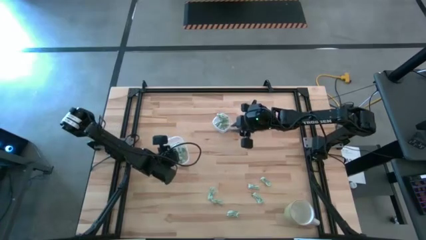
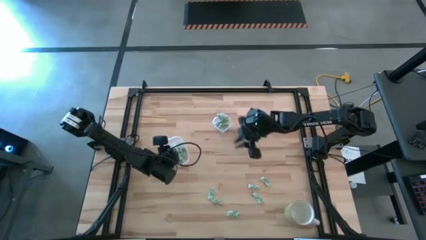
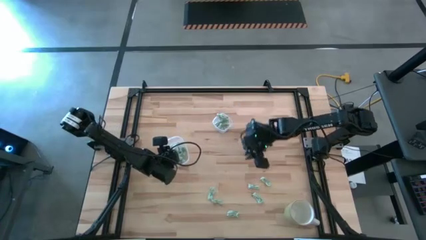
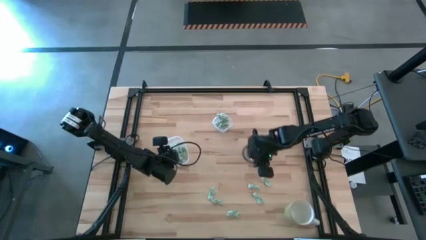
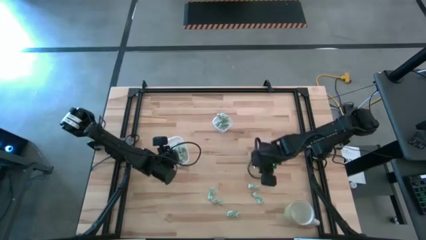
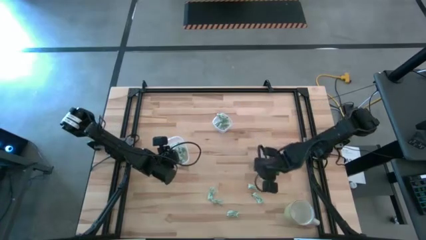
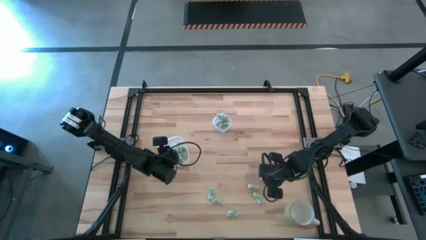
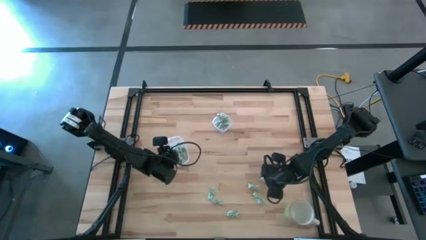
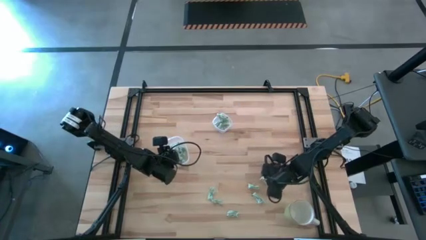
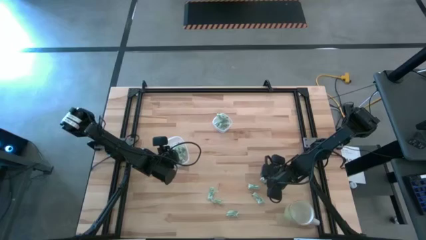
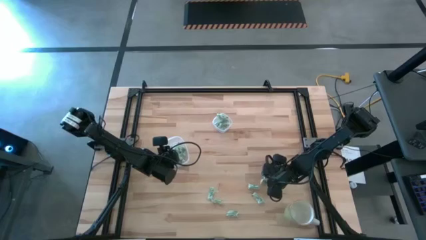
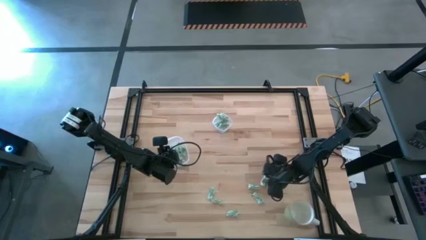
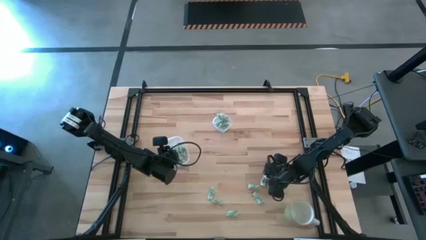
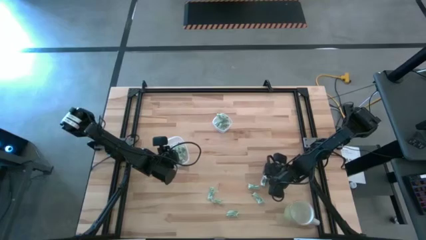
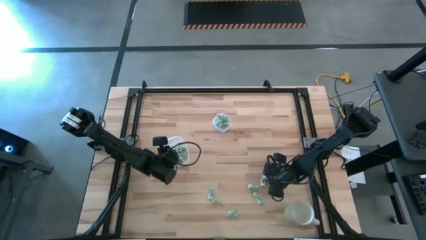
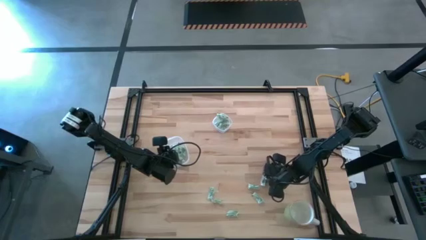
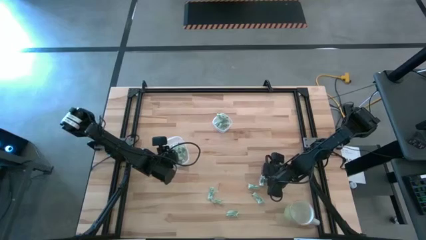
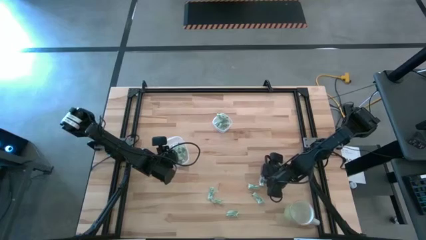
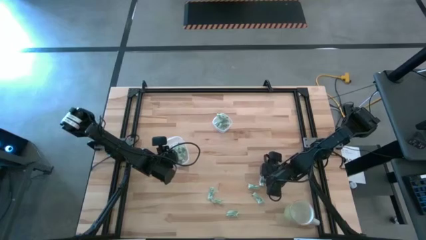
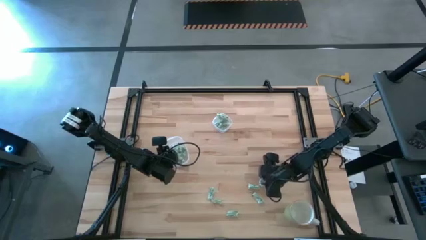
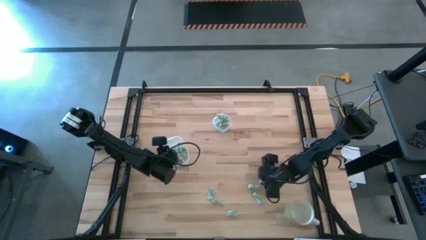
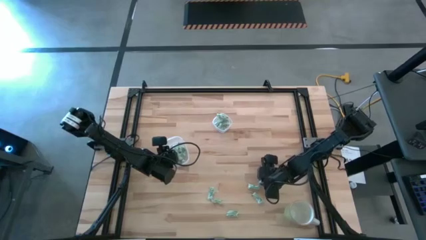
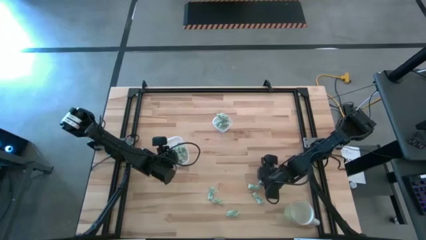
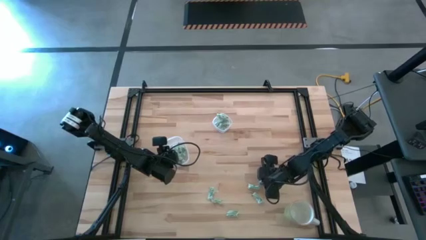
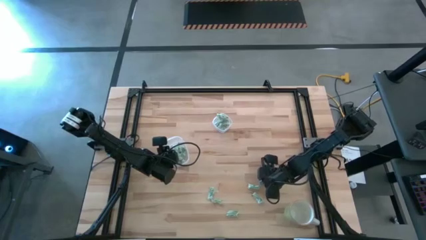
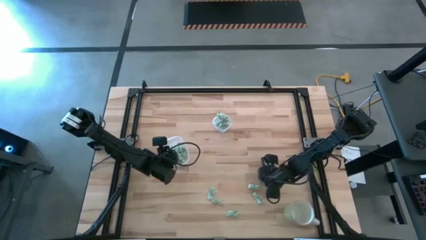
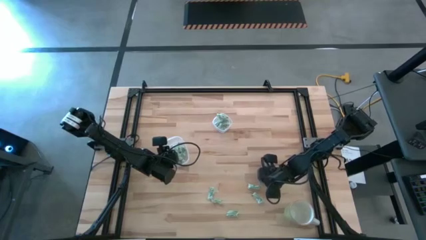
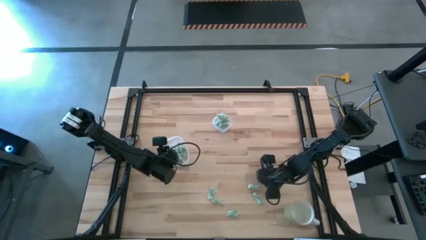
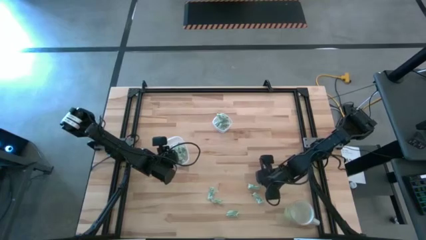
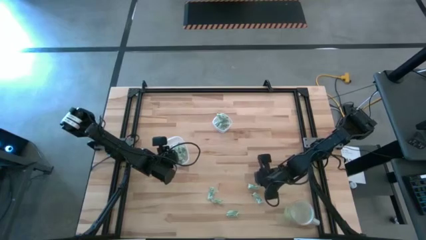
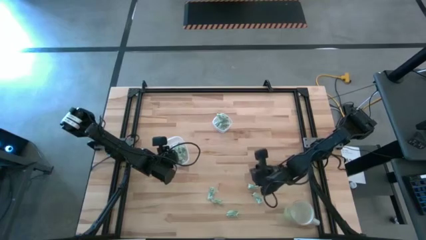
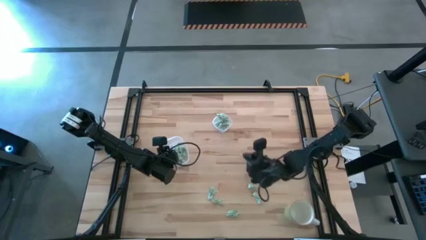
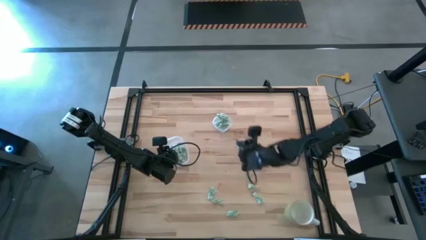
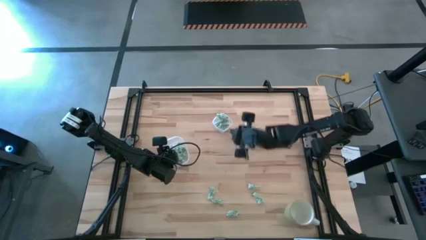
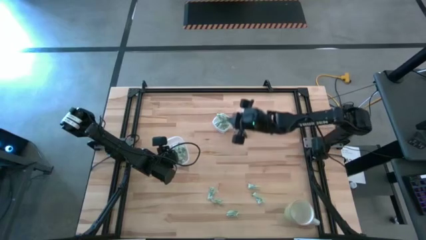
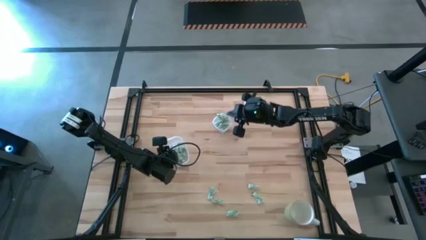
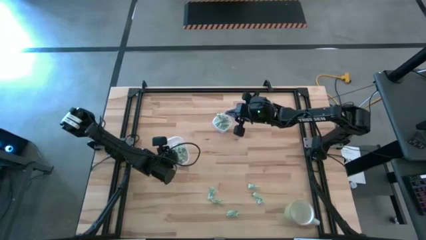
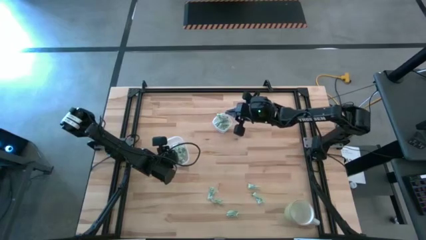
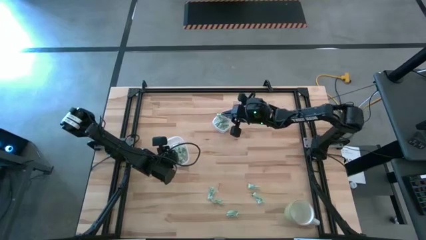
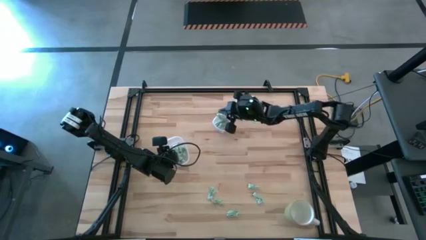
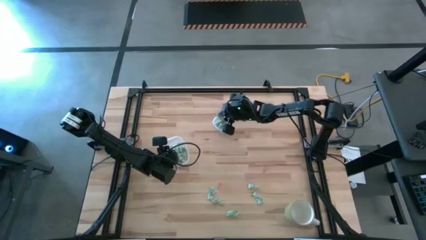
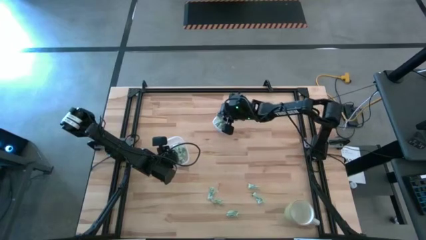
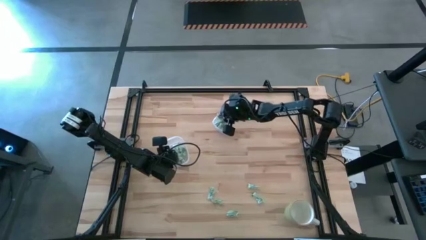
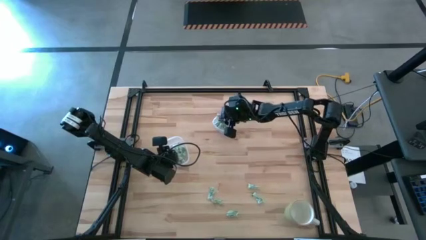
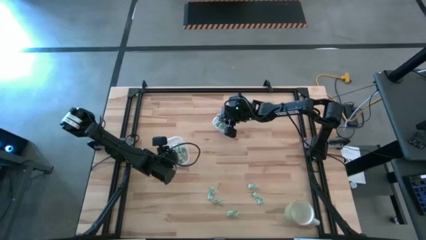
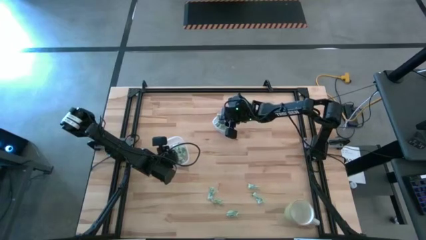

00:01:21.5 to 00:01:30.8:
Task: Pick and place items into bin
Put the stevia packet into the small transparent container

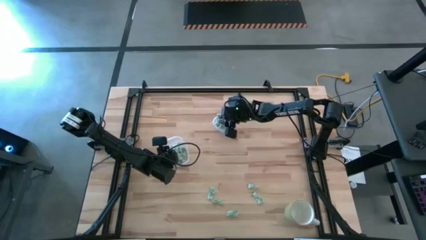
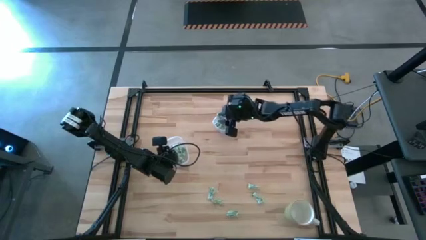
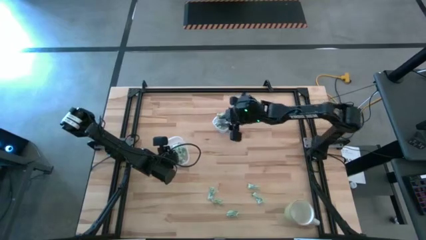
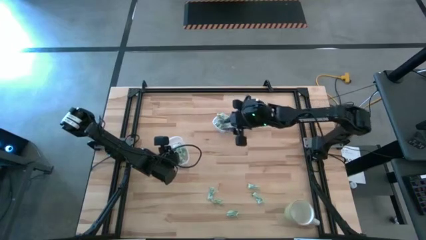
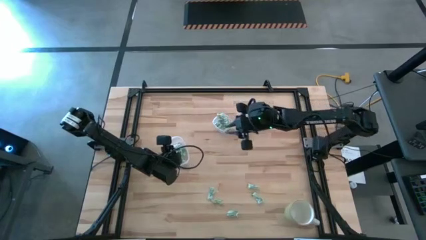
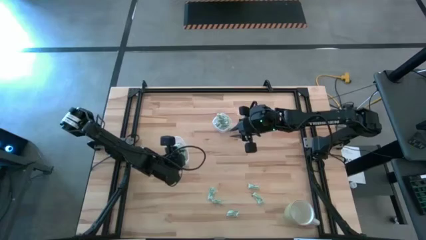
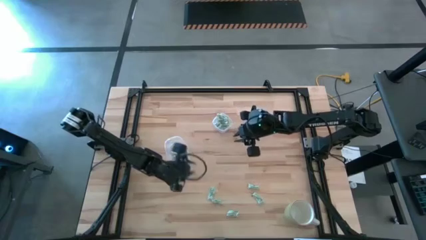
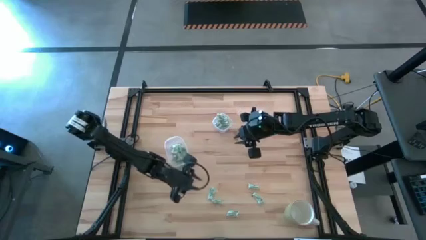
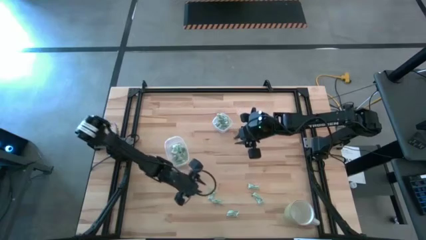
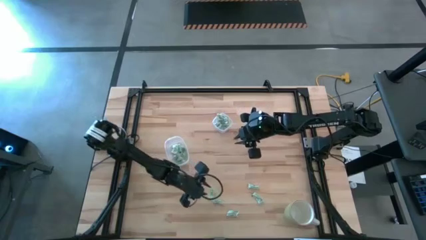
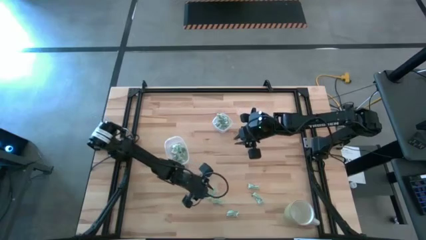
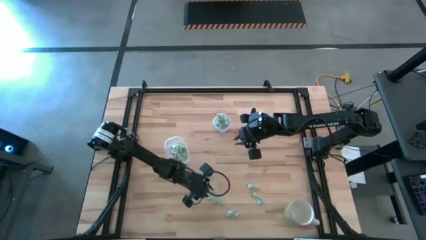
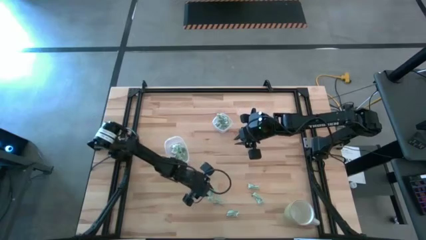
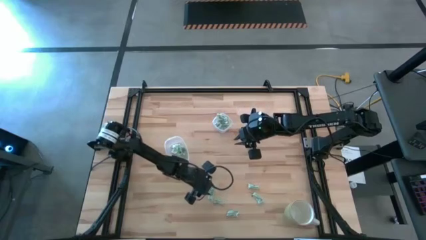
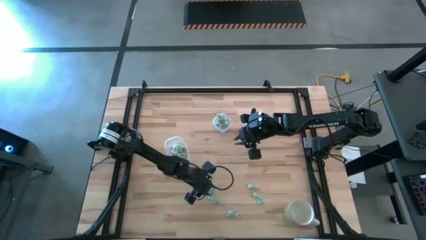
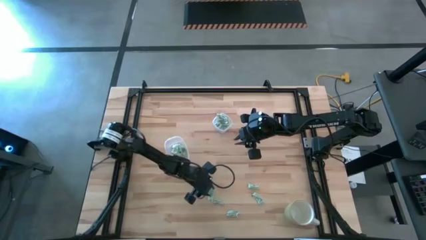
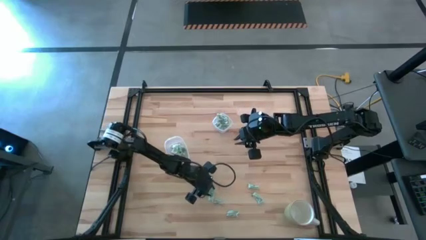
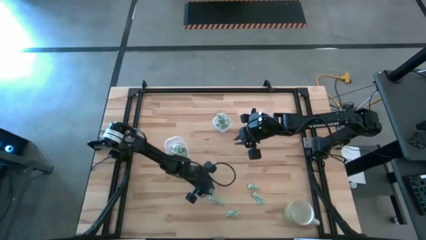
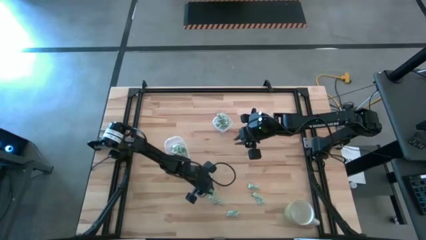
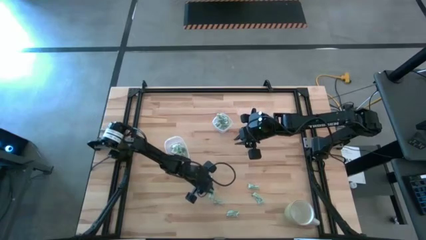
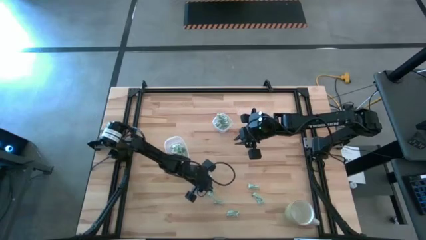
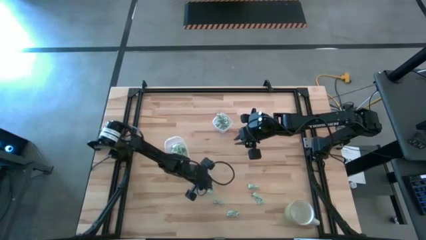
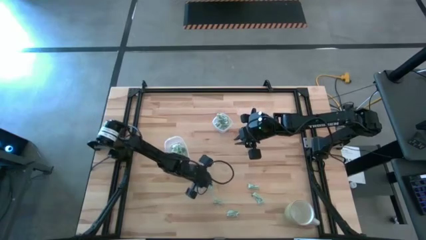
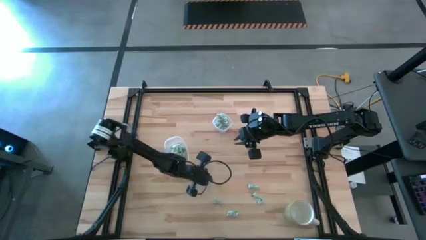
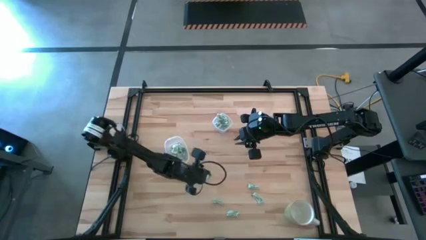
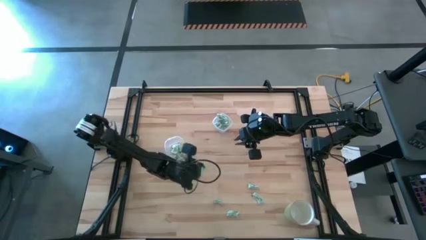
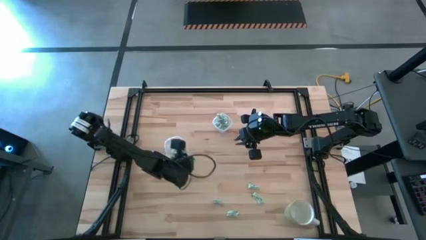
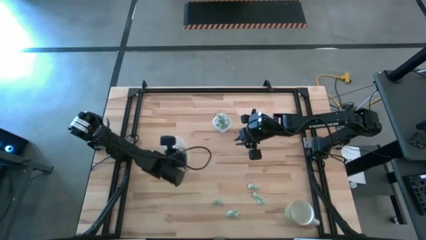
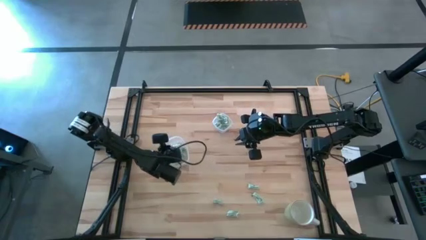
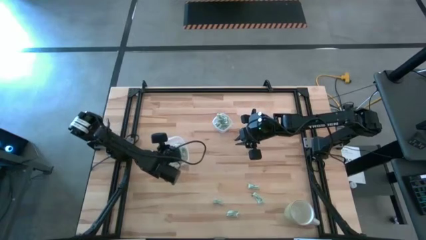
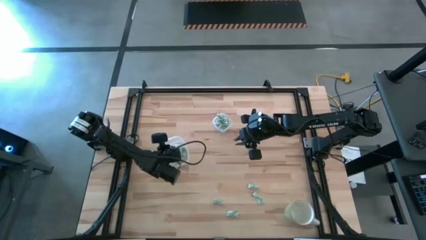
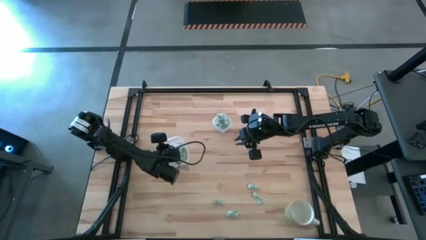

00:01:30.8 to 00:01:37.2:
Put the stevia packet into the large transparent container
